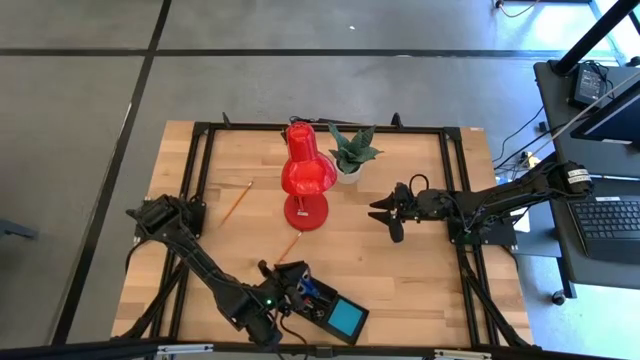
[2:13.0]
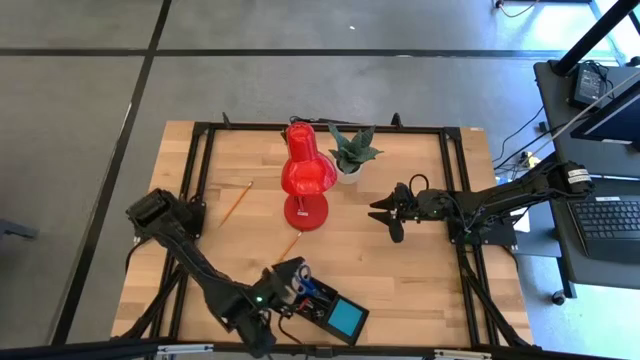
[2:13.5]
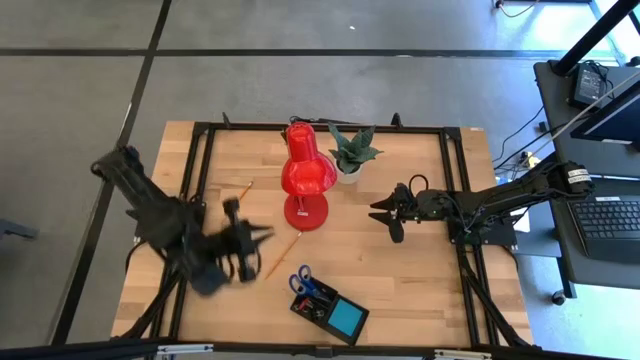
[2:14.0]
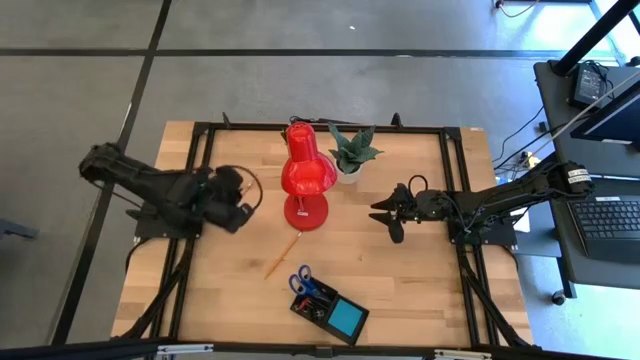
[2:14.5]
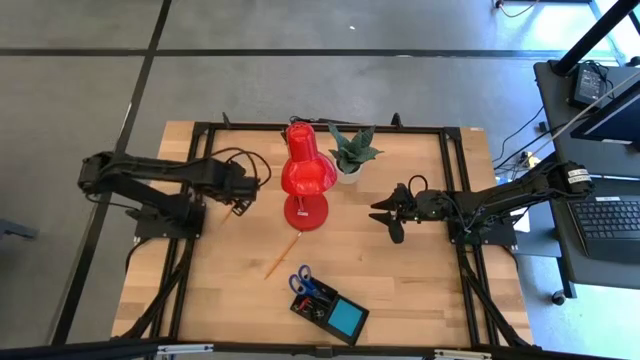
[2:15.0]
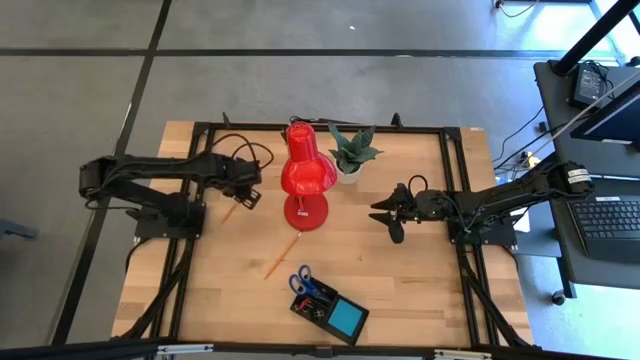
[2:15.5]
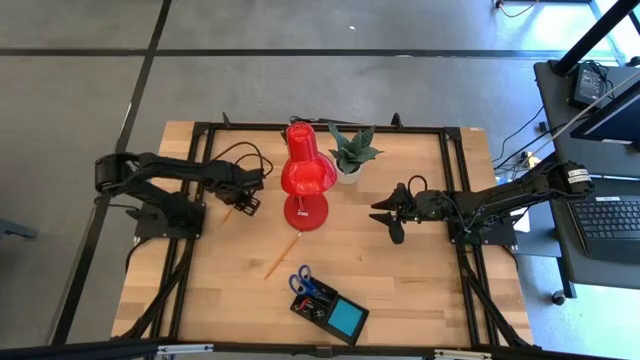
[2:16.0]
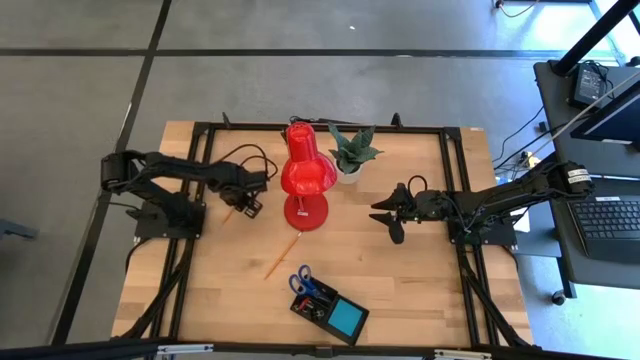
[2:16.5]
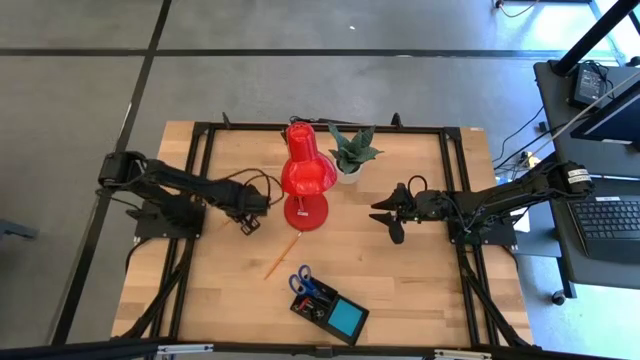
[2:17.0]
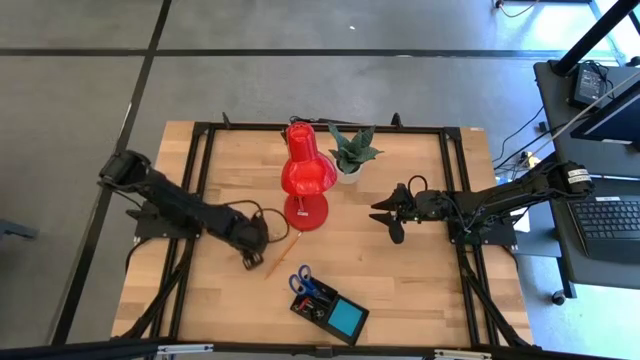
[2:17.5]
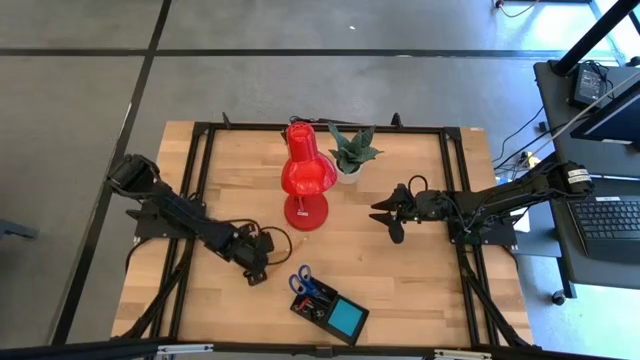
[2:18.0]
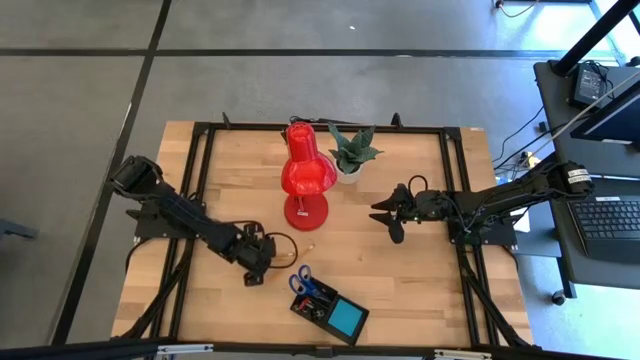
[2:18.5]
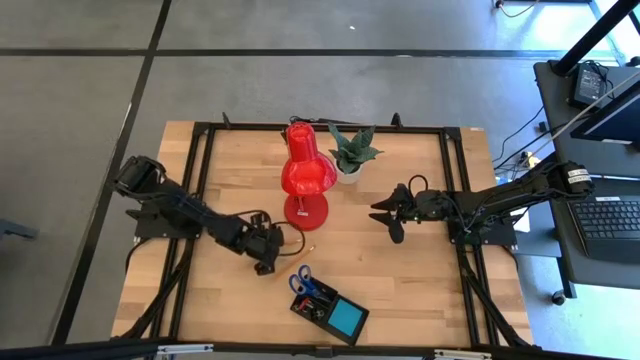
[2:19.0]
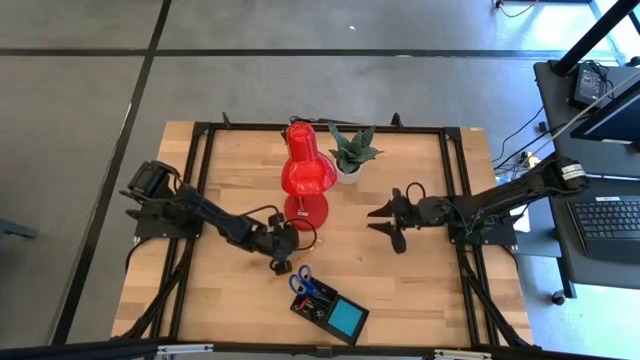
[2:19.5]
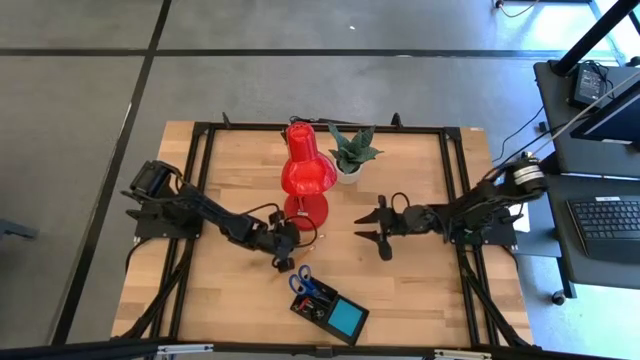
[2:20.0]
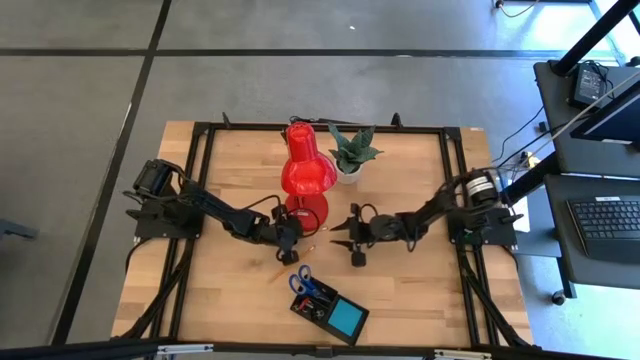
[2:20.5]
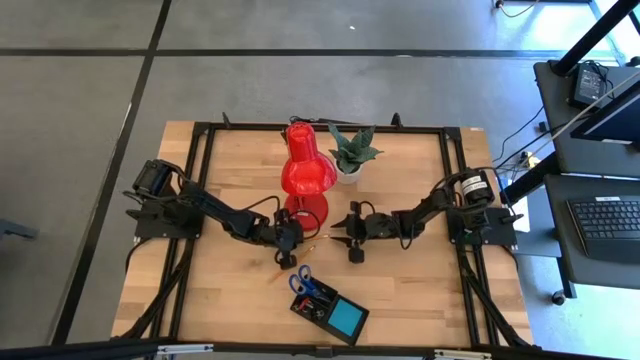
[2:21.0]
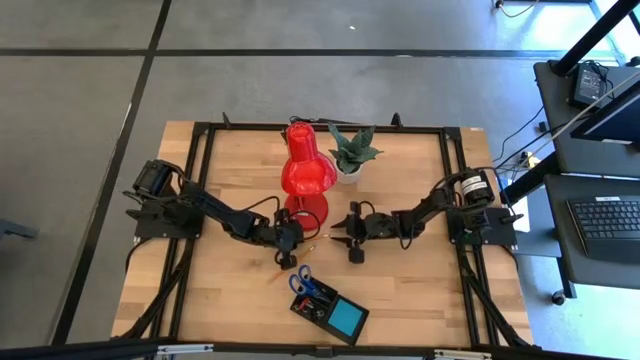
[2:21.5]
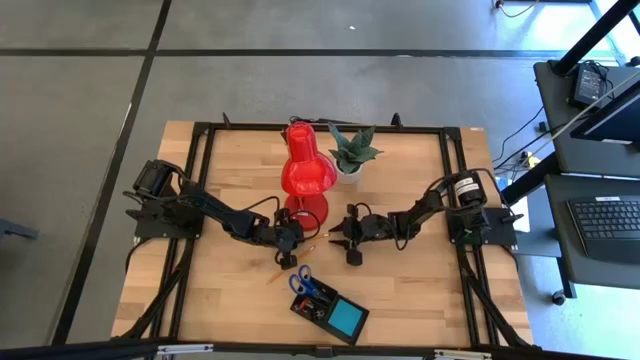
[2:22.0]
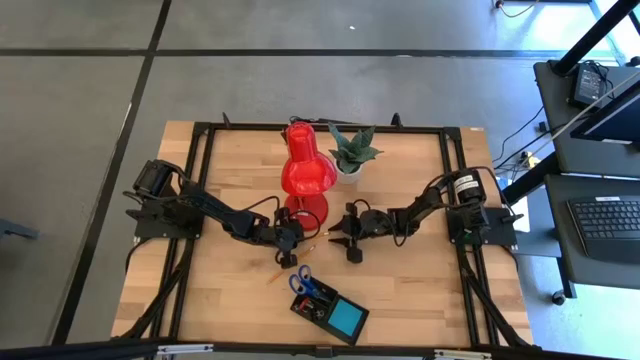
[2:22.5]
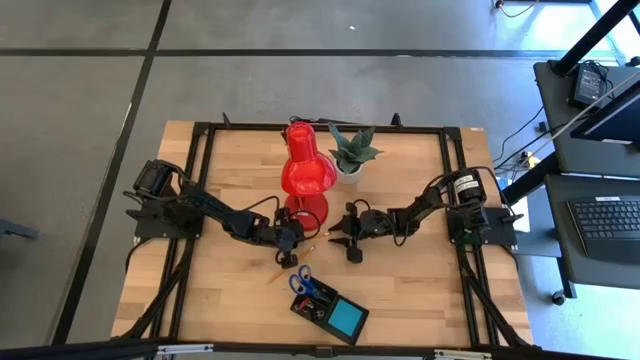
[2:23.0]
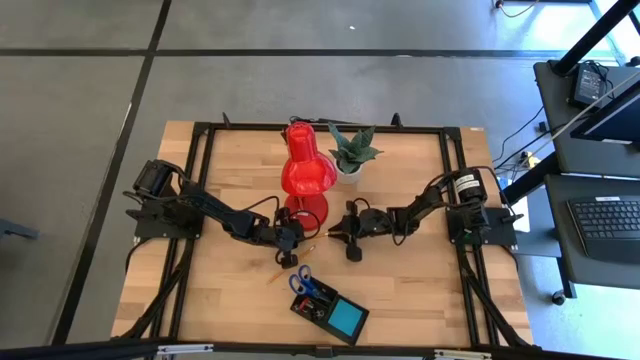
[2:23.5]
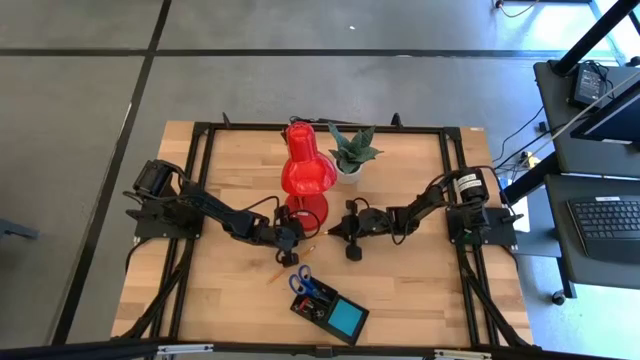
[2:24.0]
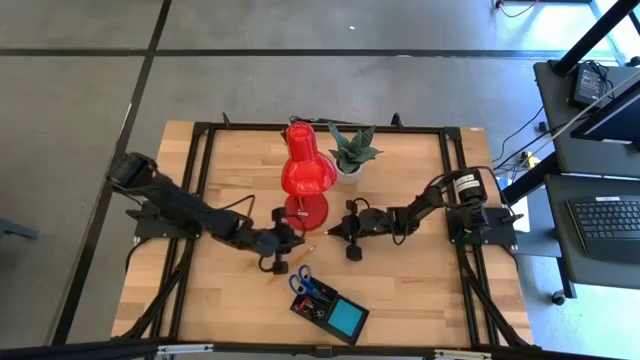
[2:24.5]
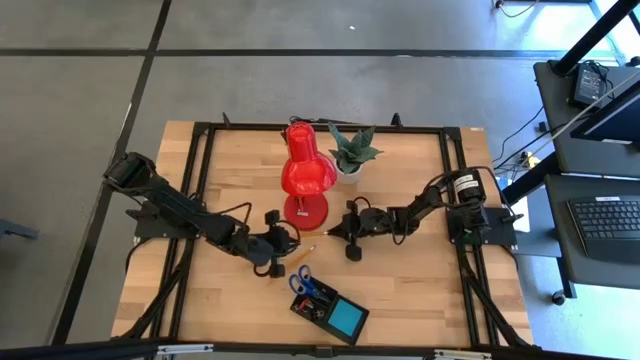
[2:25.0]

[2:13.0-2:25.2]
Task: Pick and place office supplies into organizer
Put the orange top pencil into the black desk organizer

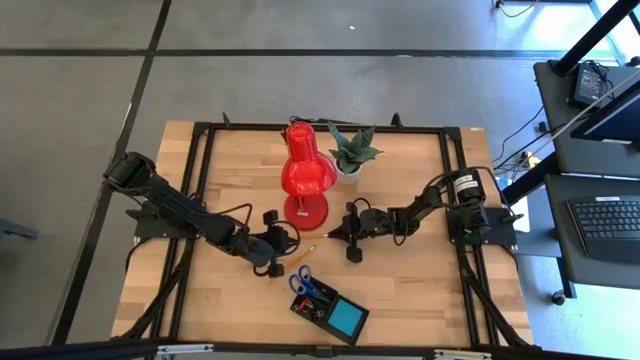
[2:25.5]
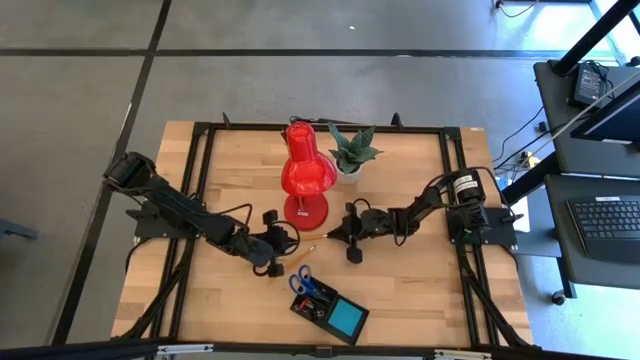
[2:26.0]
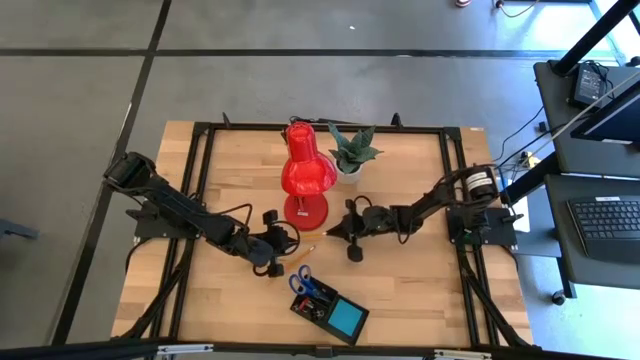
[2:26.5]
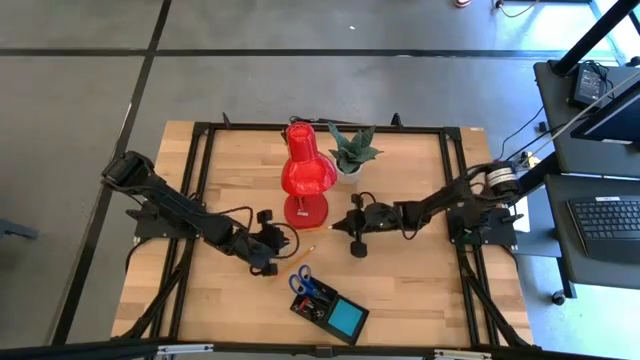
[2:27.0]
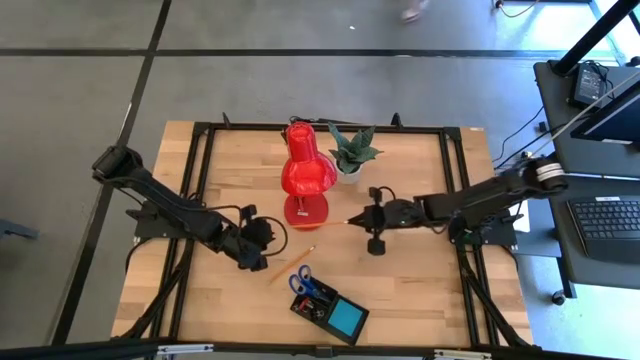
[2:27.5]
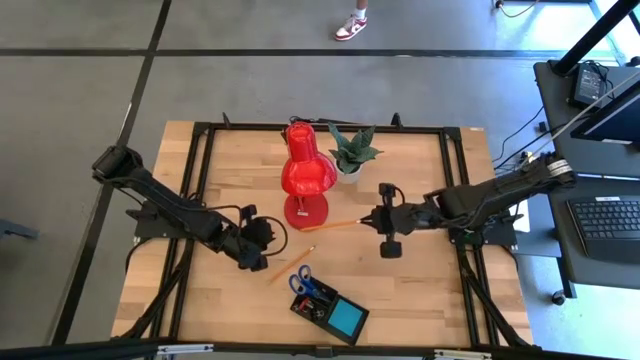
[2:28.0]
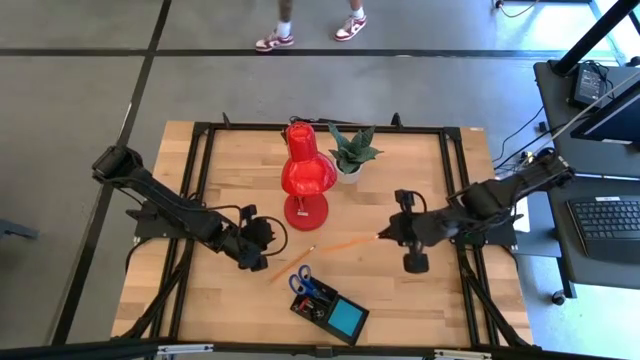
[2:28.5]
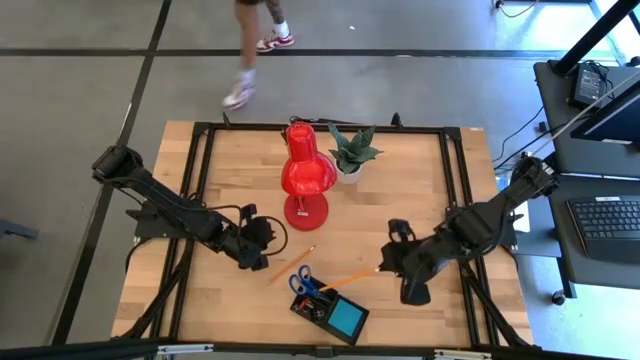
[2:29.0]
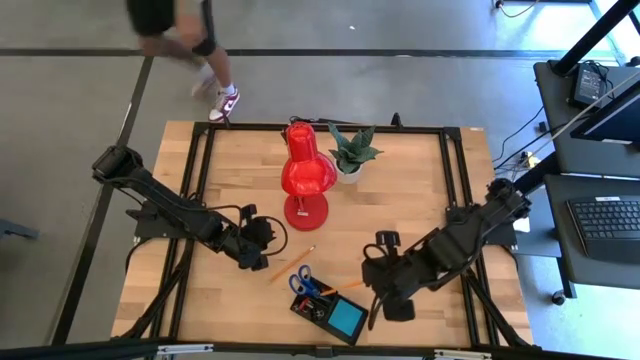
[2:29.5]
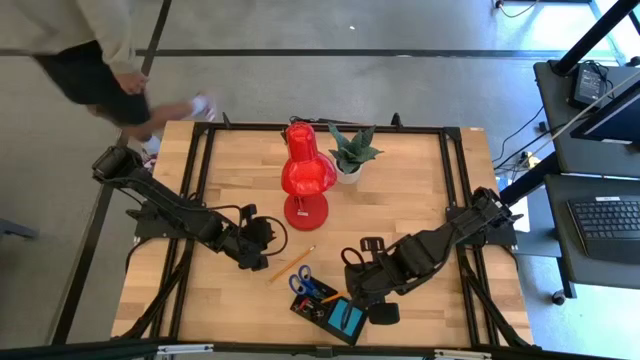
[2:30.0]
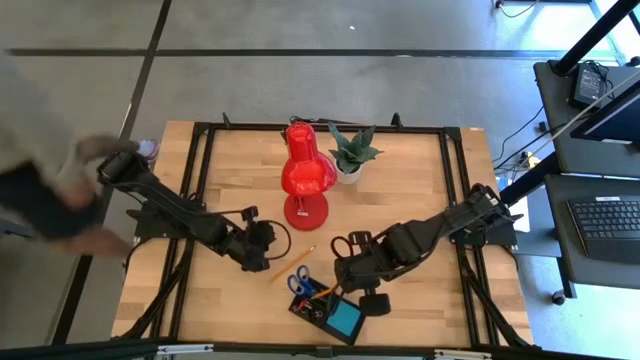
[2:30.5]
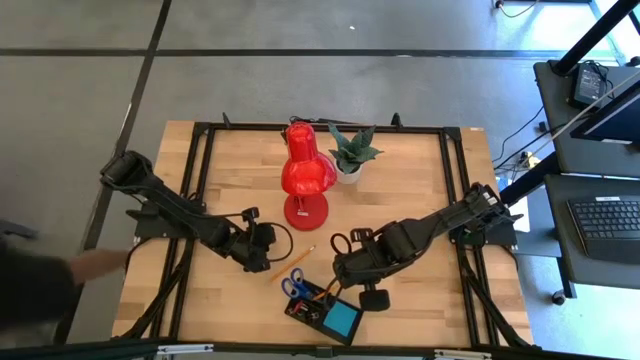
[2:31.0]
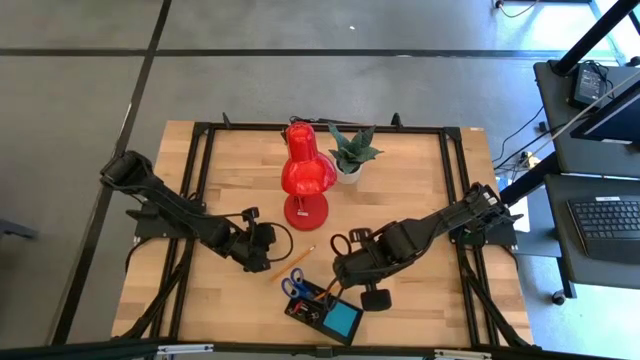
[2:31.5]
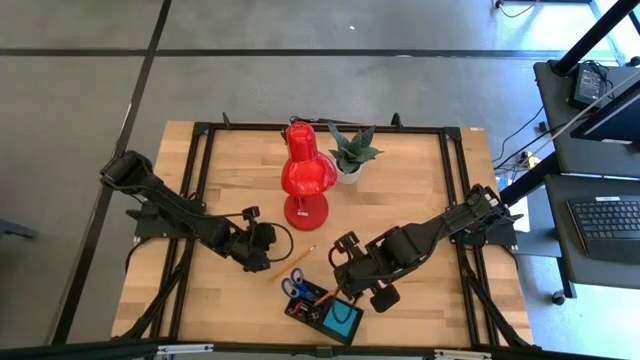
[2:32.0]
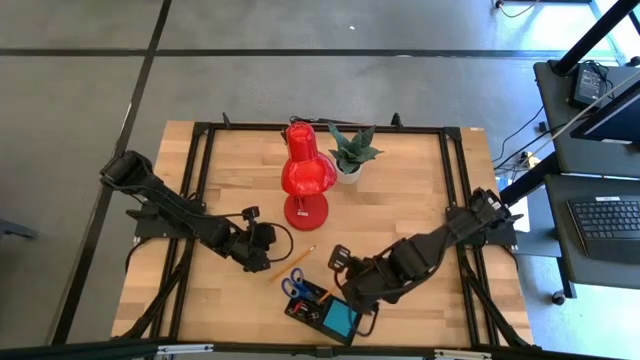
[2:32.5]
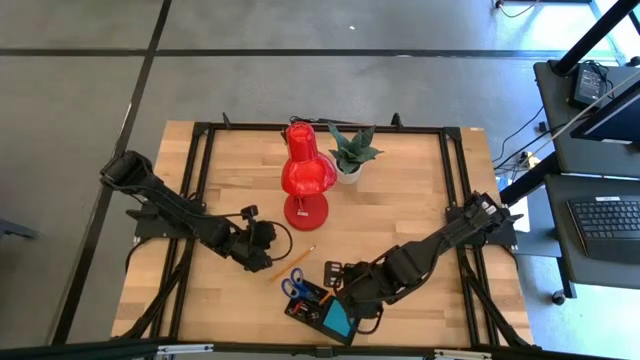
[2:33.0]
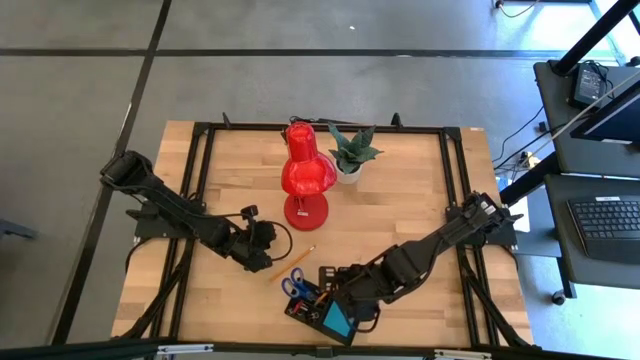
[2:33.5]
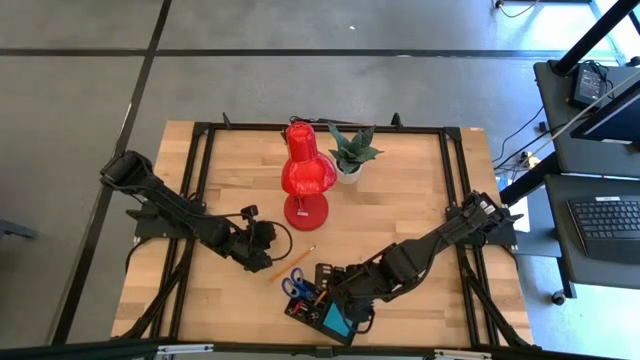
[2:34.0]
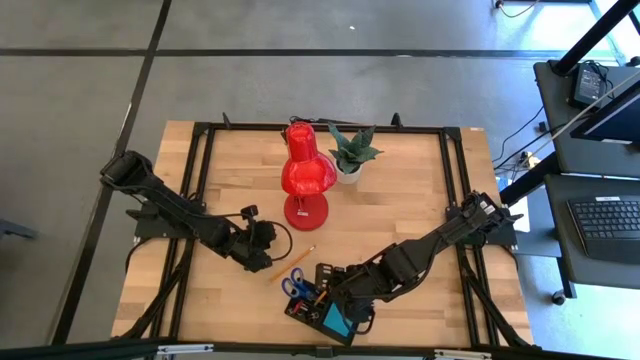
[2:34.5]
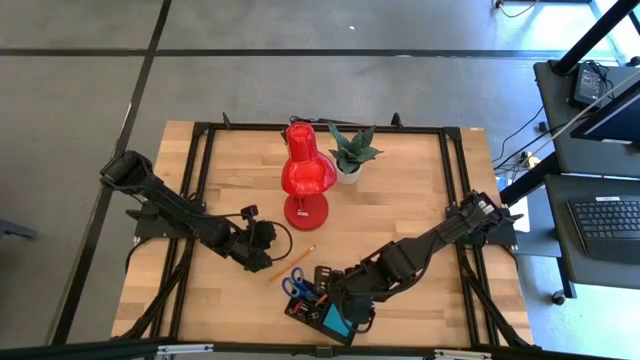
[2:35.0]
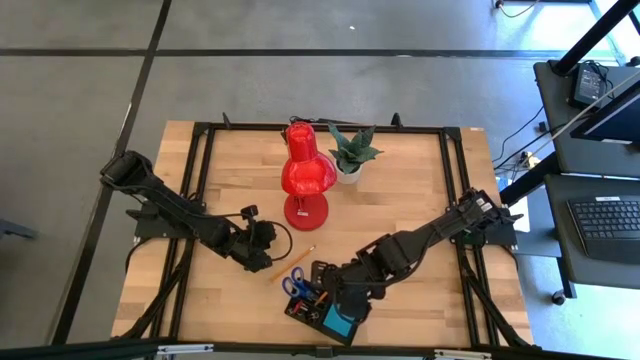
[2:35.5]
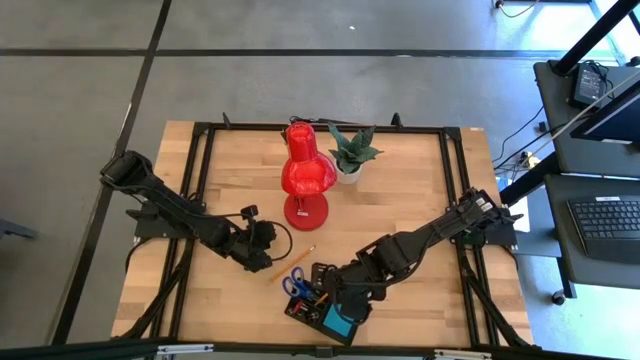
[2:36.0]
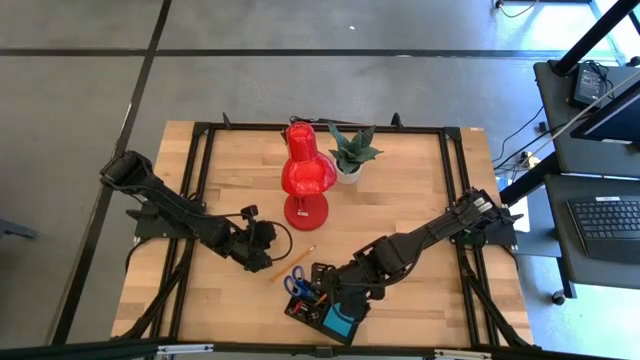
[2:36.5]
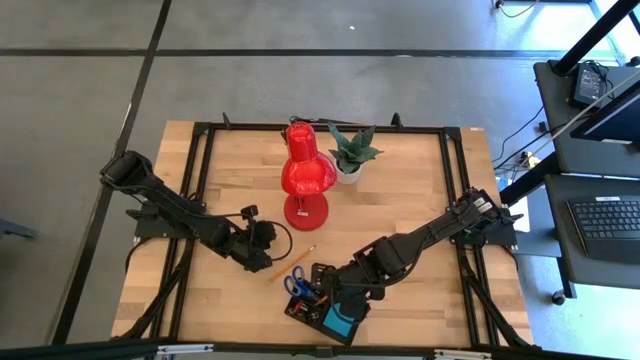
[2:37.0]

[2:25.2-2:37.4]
Put the orange top pencil into the black desk organizer
